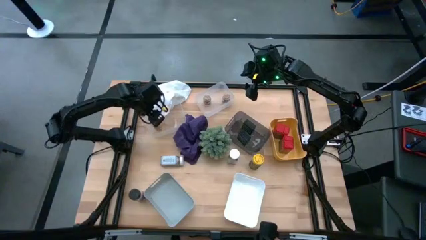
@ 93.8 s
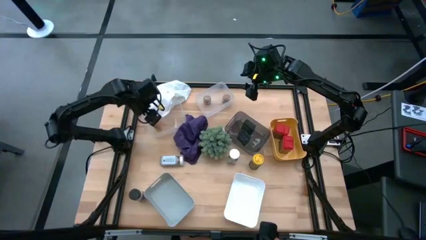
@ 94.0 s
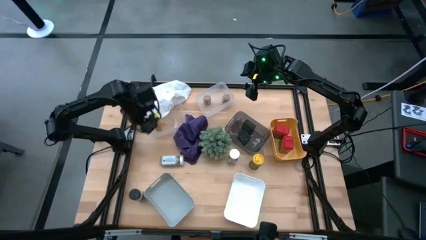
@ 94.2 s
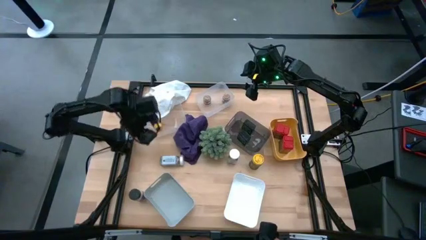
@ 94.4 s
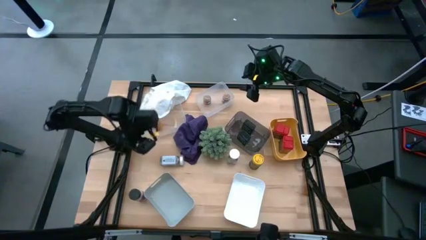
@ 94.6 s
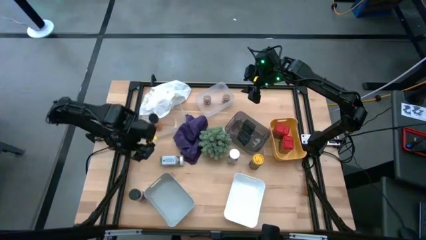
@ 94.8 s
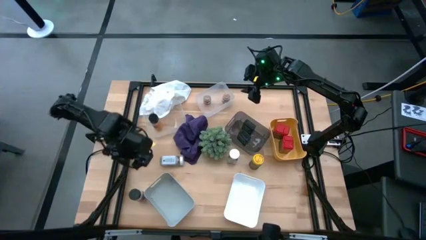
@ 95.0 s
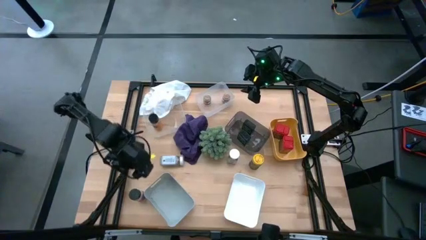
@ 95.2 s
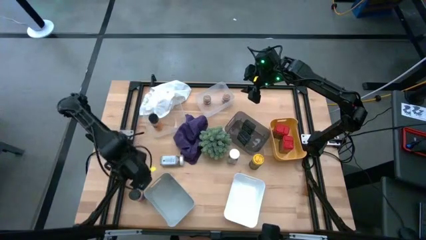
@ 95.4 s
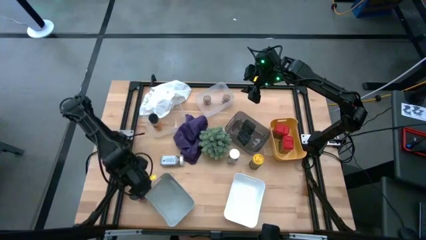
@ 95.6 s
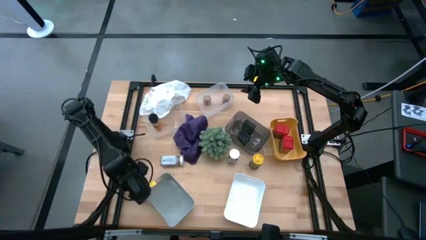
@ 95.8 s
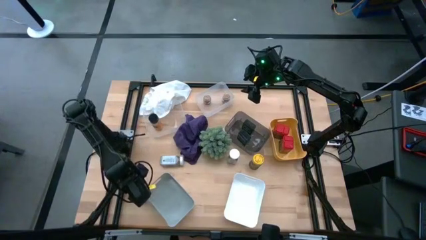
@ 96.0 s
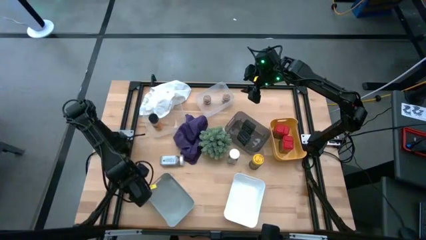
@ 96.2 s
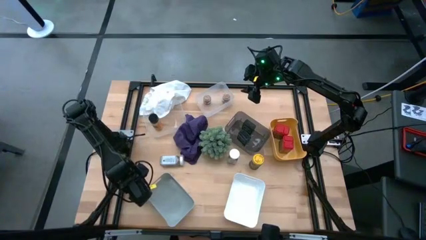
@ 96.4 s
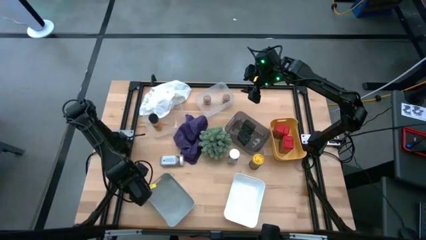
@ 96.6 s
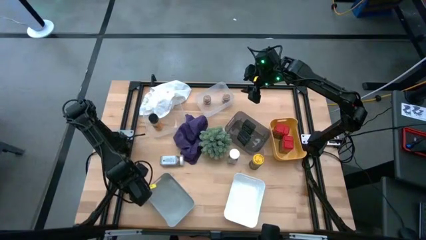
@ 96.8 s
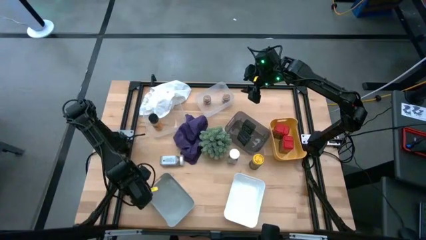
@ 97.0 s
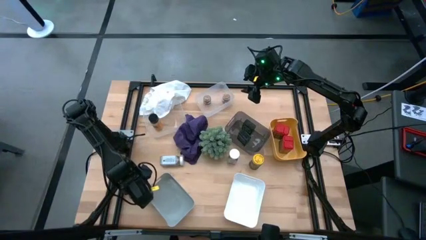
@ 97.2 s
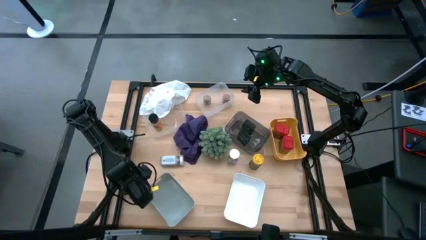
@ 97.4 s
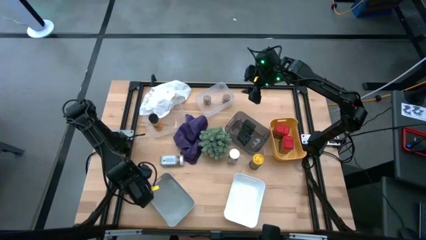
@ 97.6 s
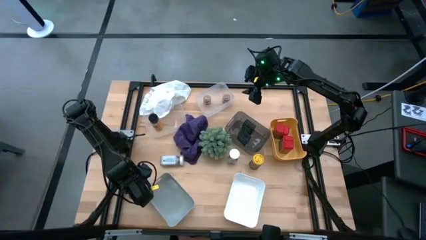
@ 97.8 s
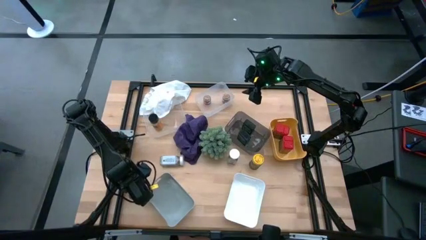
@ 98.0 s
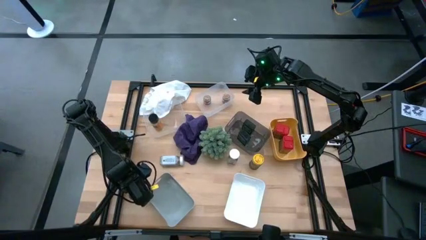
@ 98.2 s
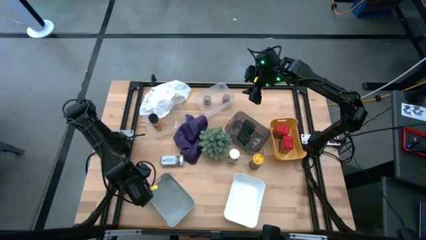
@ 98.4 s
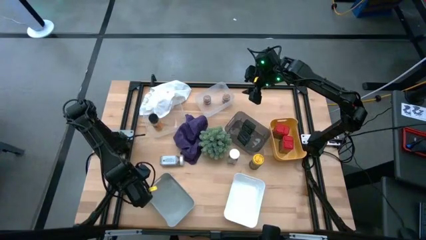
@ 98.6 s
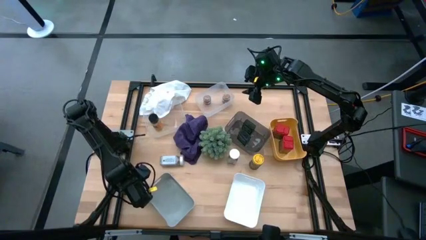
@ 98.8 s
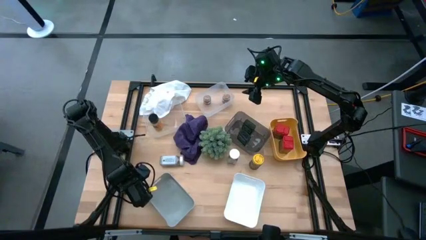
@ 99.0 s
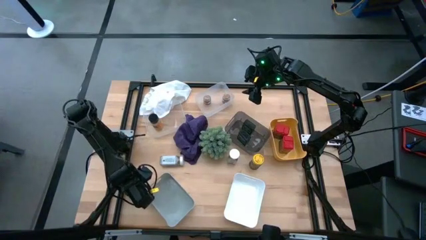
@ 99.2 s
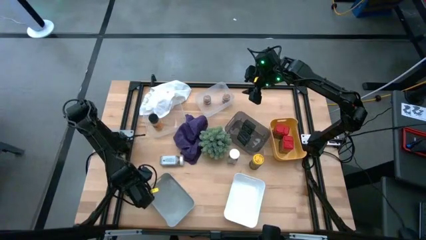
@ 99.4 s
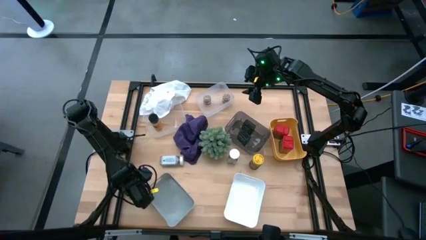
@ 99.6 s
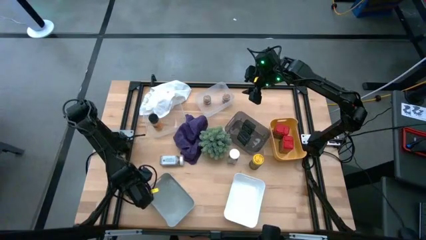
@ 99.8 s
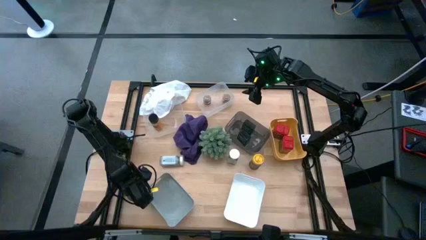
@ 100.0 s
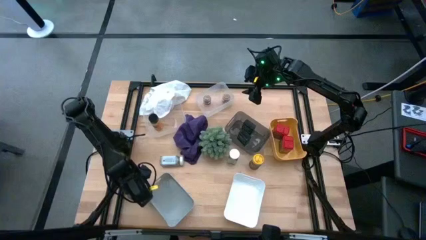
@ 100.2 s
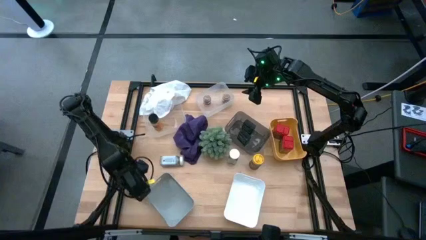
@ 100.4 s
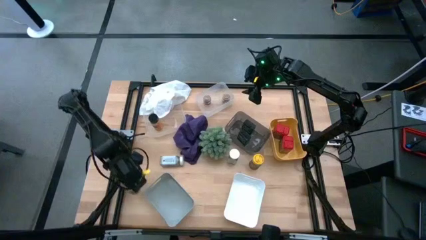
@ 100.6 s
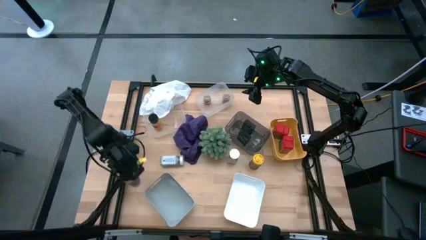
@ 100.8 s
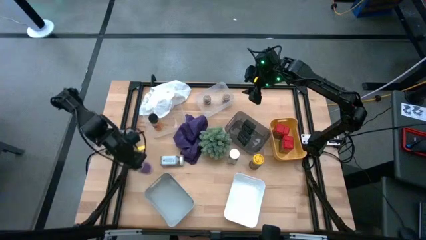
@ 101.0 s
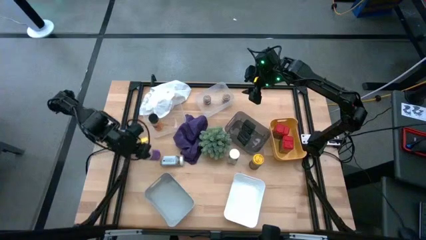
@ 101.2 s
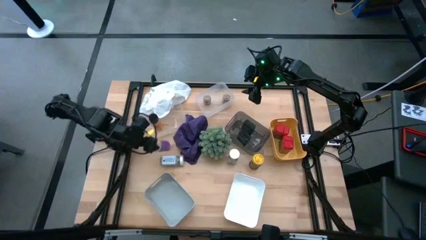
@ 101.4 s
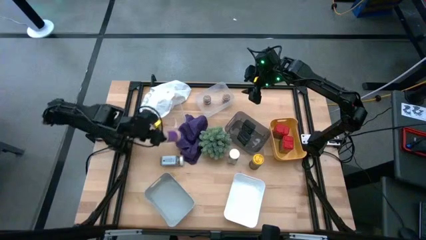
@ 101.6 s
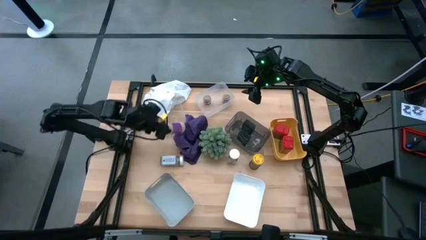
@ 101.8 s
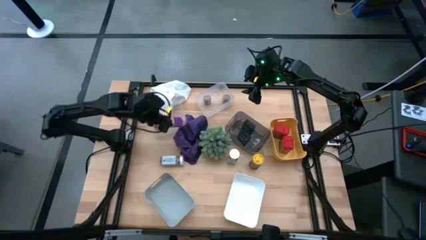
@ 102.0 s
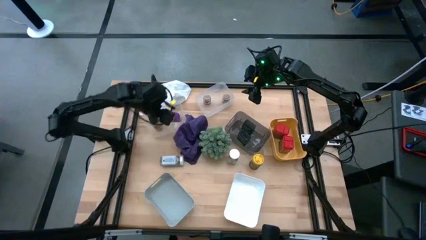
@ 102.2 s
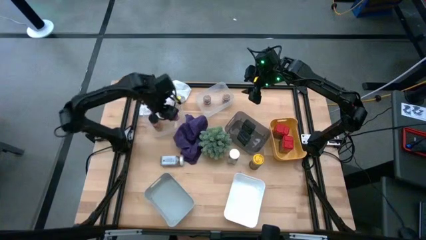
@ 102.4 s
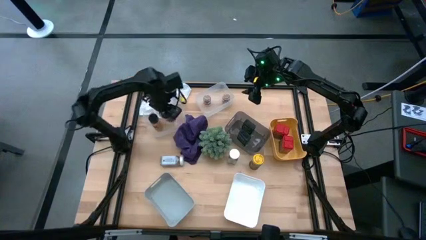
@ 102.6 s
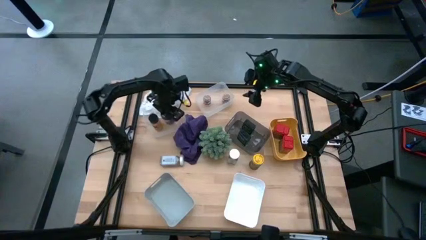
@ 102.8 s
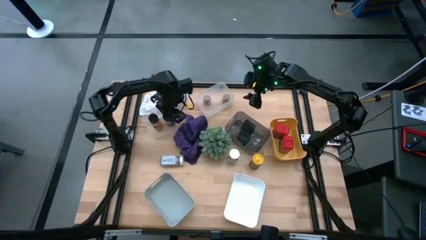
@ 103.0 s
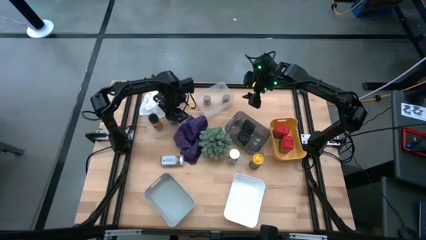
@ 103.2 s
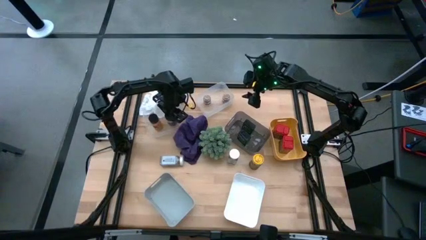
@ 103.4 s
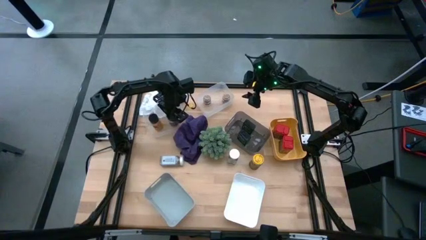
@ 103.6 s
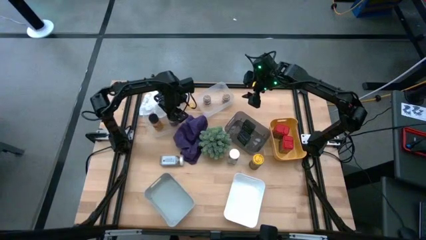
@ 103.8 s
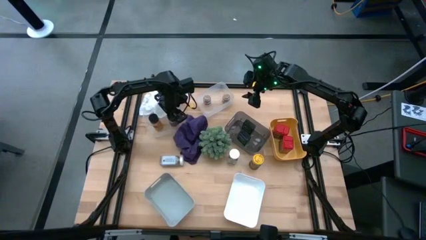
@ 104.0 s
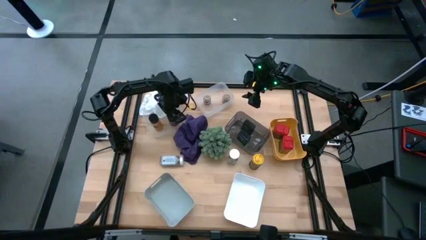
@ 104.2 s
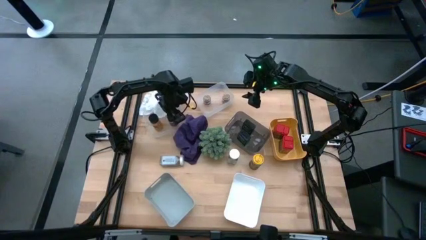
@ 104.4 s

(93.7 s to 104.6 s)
Task: Sort spices by type
Put the black seasoning bottle into the left transparent bin

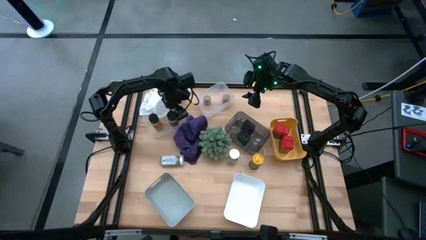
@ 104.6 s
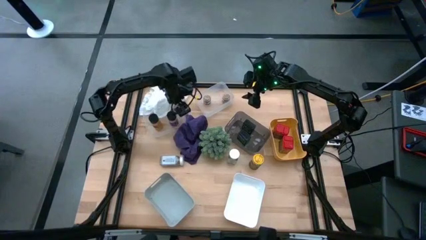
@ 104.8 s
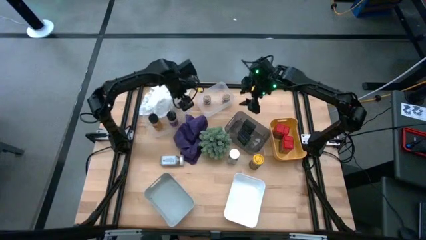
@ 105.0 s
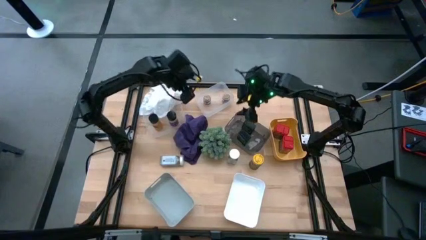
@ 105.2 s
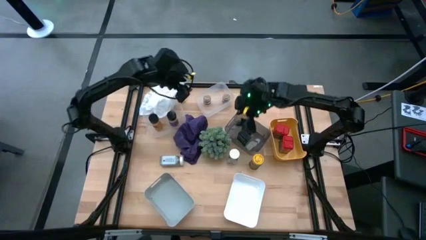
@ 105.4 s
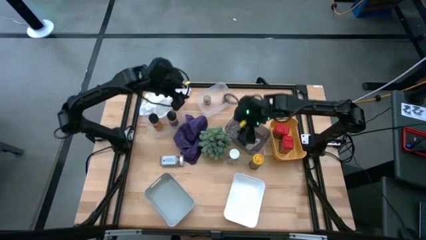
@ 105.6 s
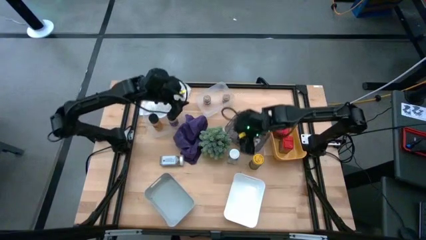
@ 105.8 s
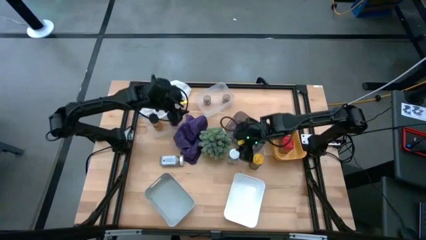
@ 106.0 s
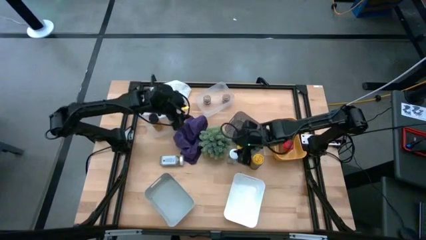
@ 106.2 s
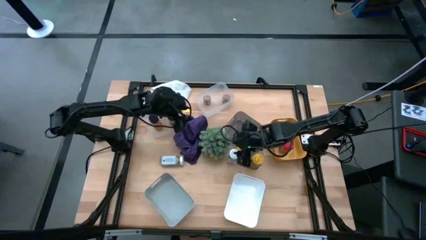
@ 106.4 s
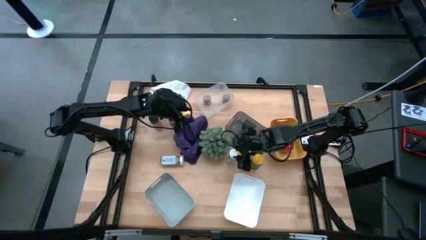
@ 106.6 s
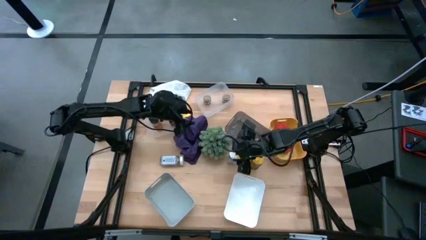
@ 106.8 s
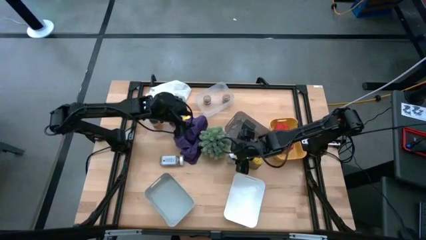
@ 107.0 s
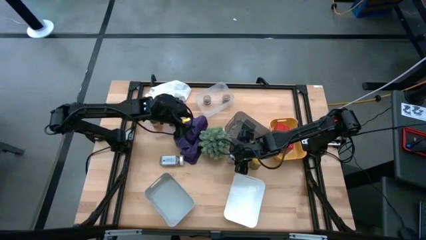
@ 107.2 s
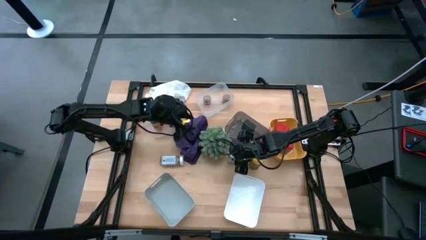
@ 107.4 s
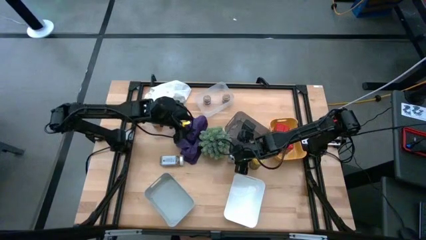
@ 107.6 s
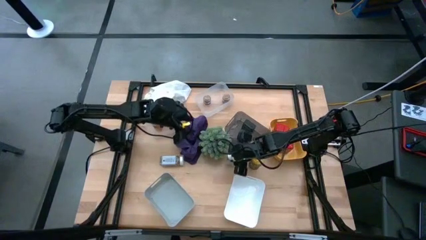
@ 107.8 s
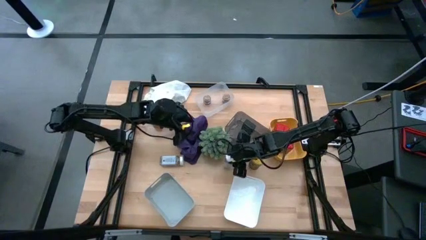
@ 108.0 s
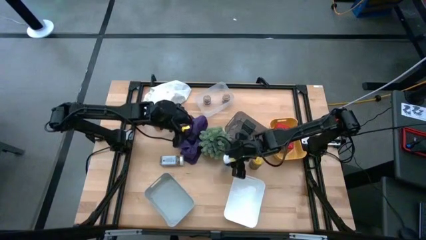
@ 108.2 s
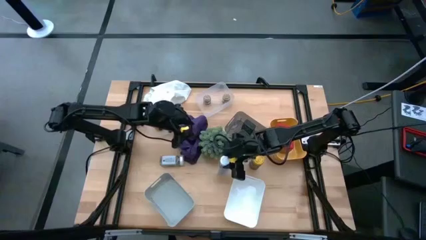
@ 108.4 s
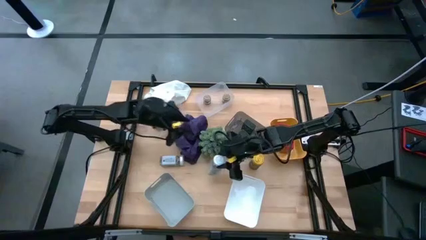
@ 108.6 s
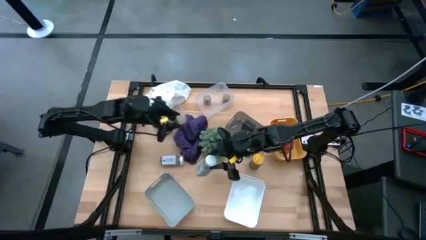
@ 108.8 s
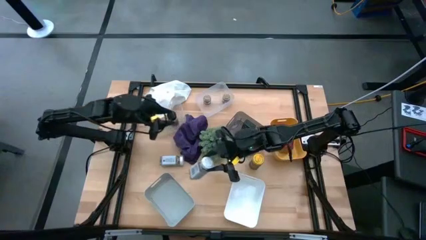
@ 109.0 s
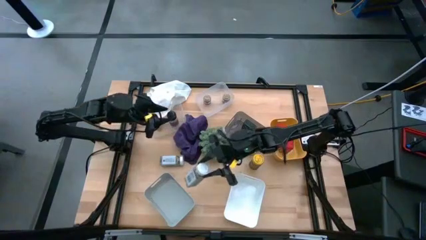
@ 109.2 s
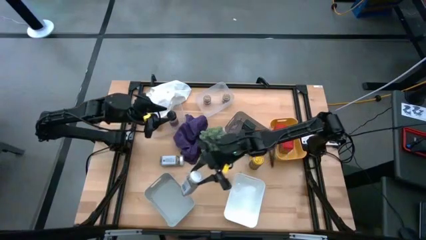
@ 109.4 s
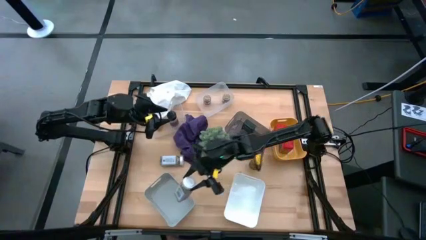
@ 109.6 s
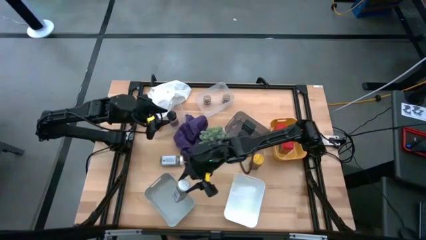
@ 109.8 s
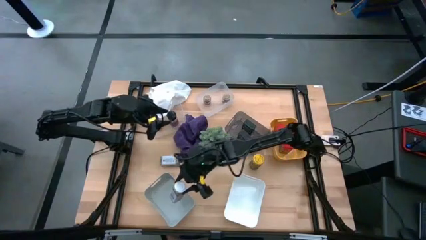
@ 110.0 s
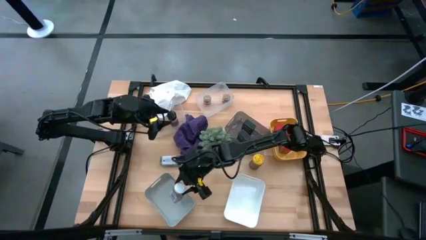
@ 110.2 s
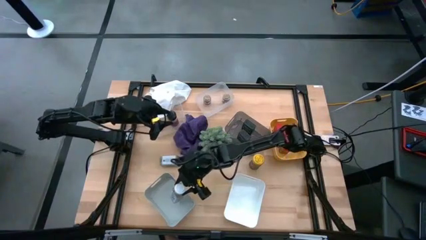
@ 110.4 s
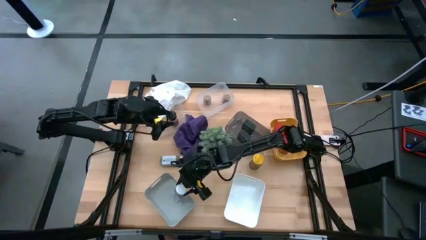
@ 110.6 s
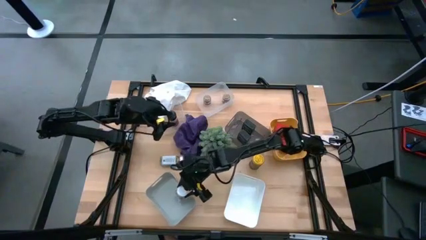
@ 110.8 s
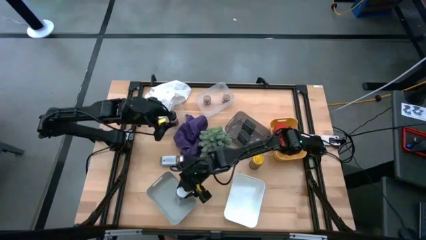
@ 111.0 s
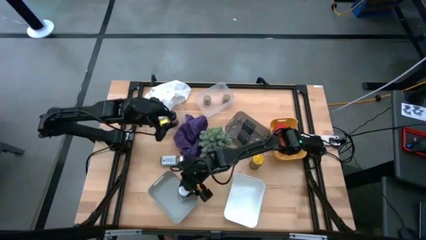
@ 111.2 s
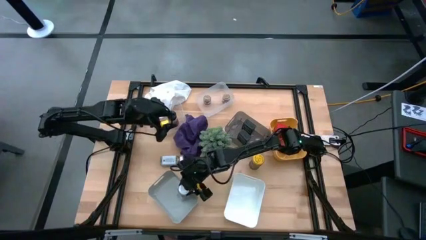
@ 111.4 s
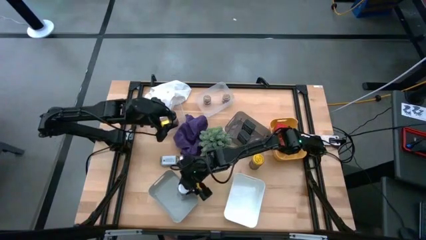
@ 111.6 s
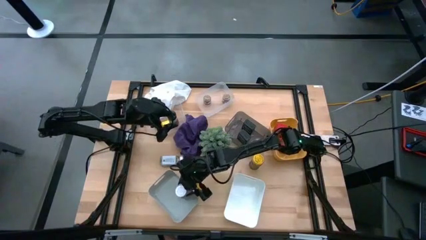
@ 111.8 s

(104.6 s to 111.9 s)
Put the right white seasoning bottle into the gray bin
